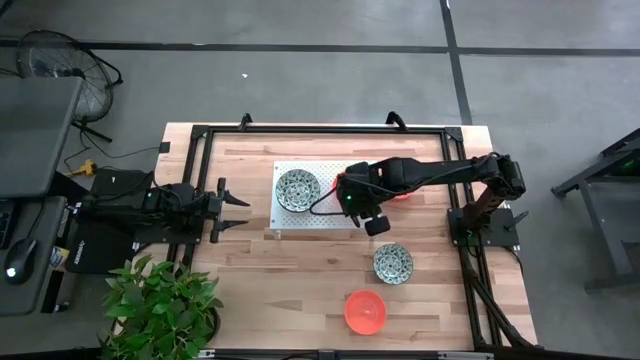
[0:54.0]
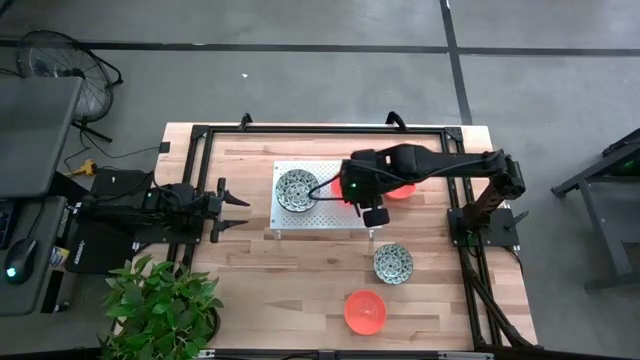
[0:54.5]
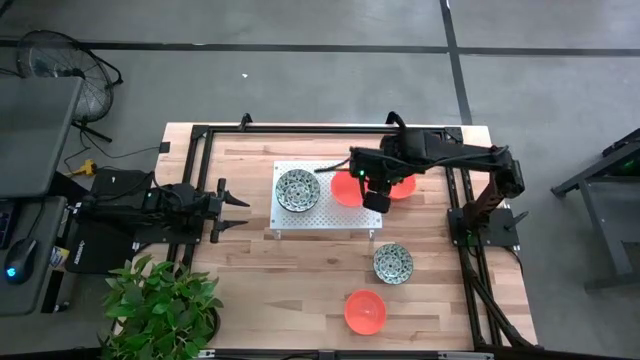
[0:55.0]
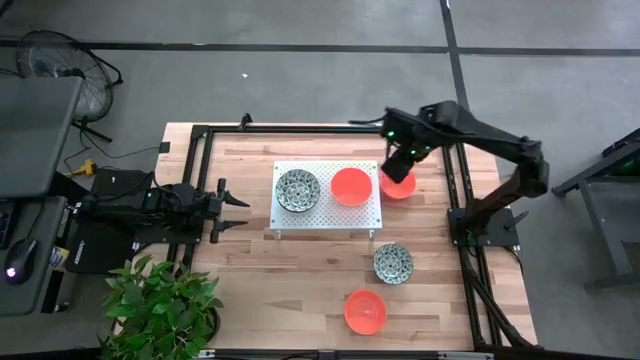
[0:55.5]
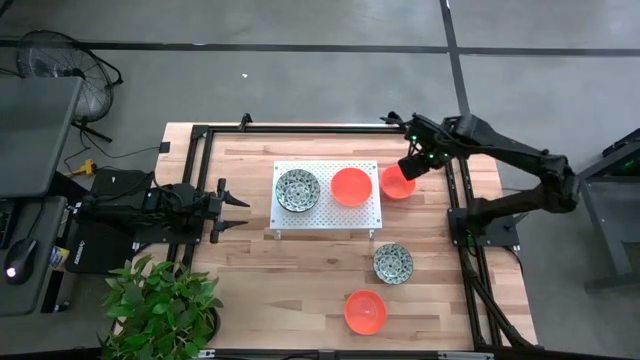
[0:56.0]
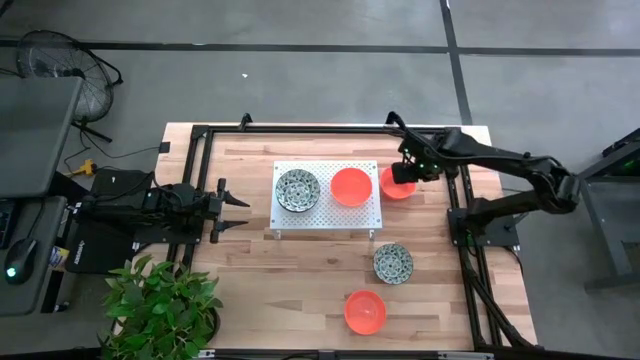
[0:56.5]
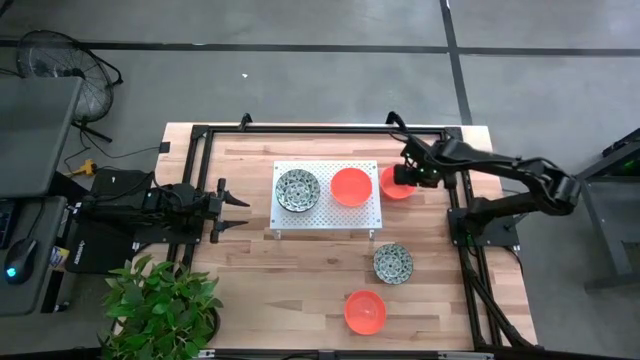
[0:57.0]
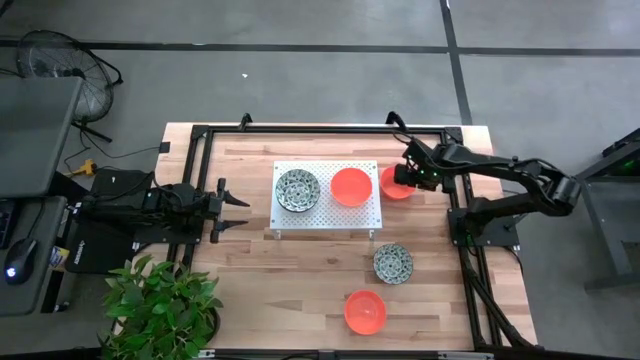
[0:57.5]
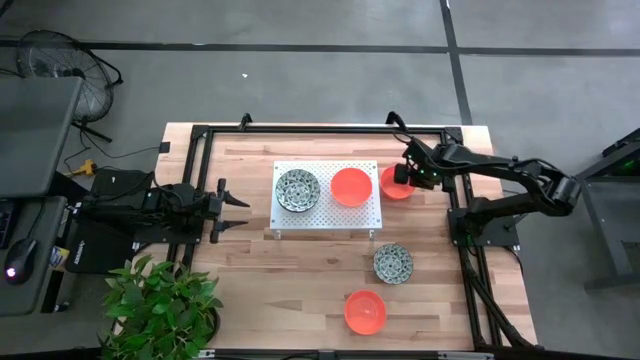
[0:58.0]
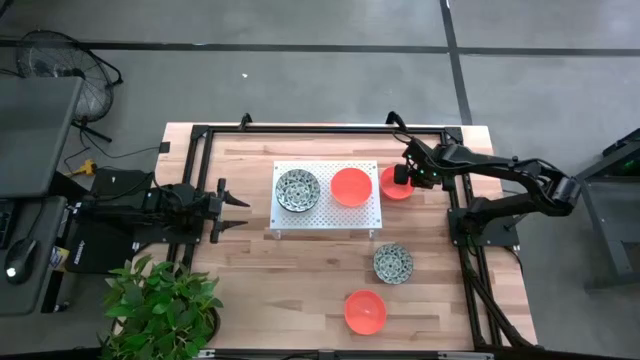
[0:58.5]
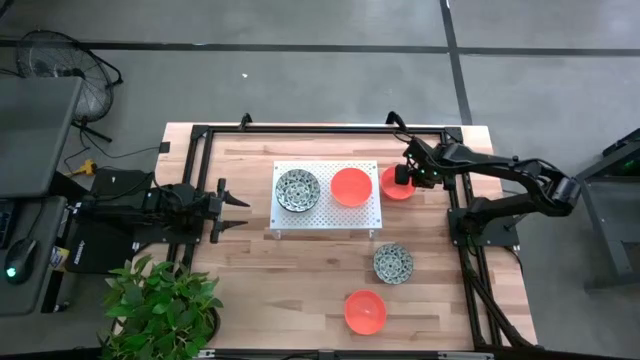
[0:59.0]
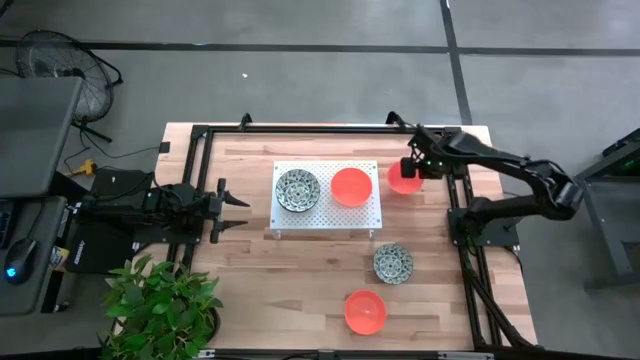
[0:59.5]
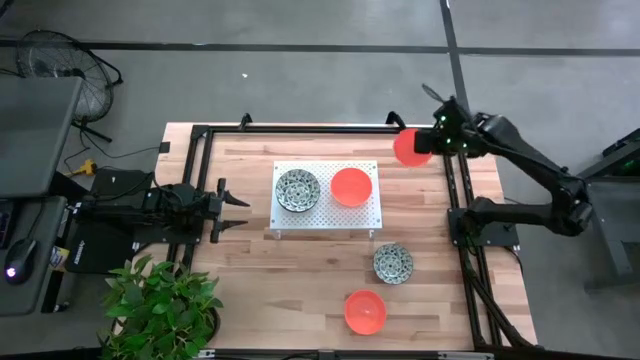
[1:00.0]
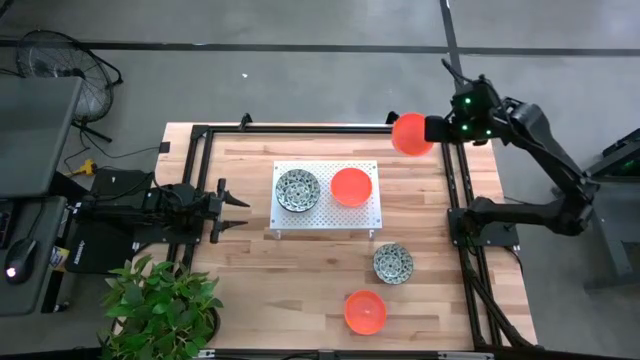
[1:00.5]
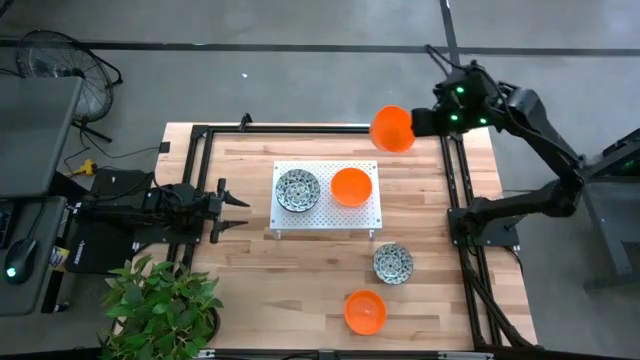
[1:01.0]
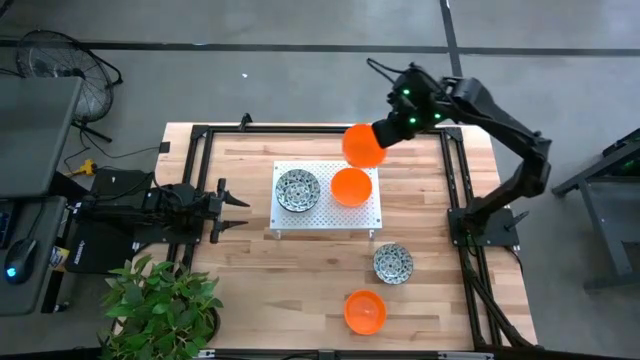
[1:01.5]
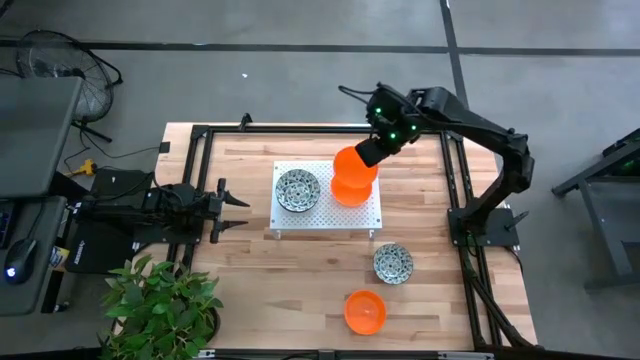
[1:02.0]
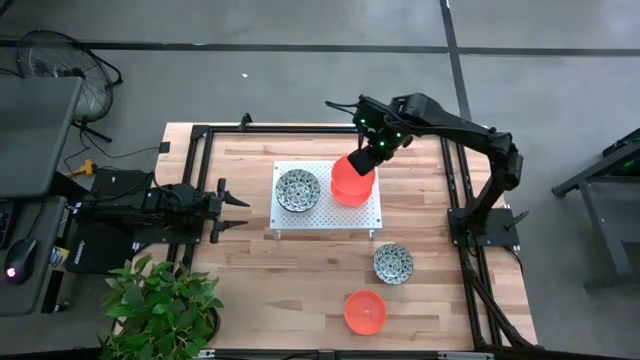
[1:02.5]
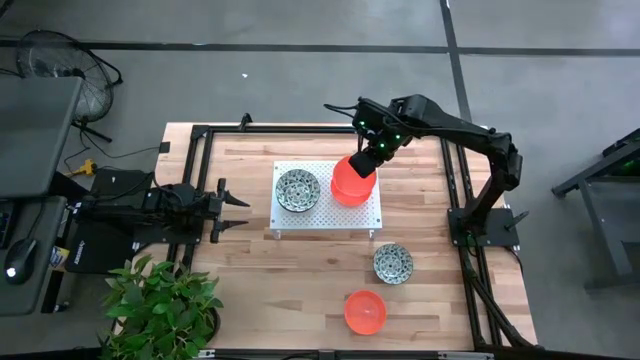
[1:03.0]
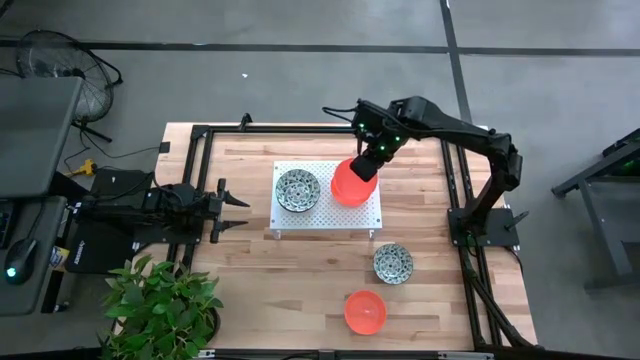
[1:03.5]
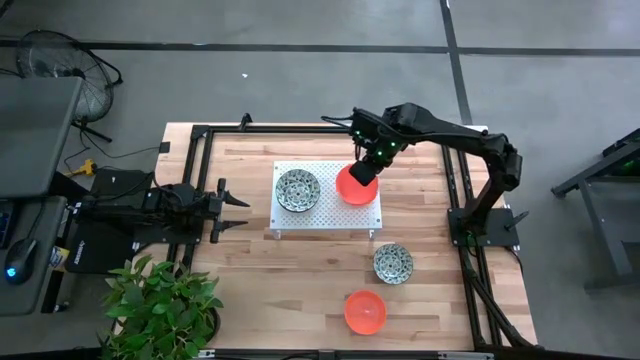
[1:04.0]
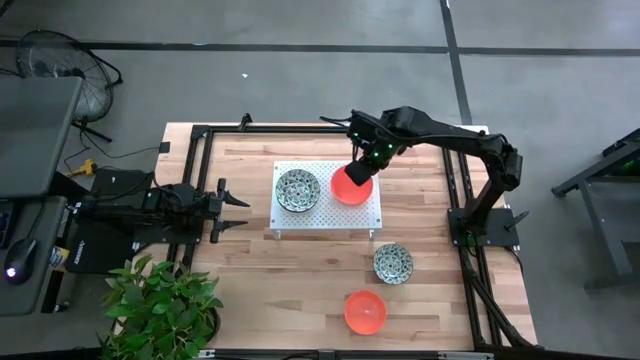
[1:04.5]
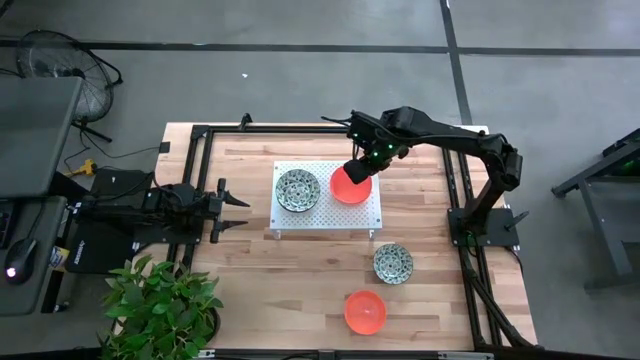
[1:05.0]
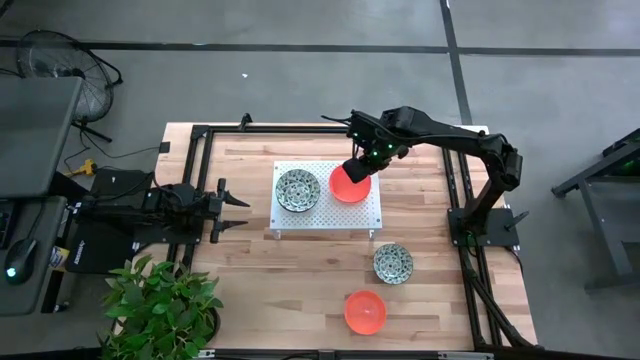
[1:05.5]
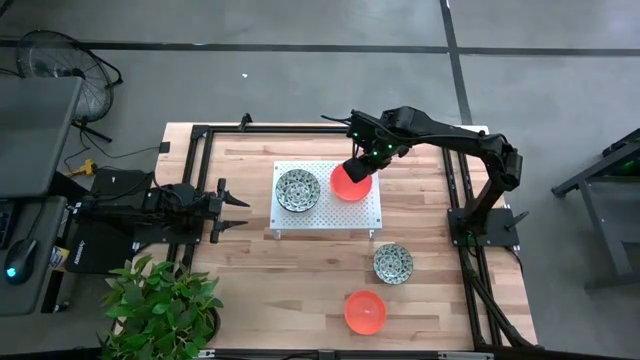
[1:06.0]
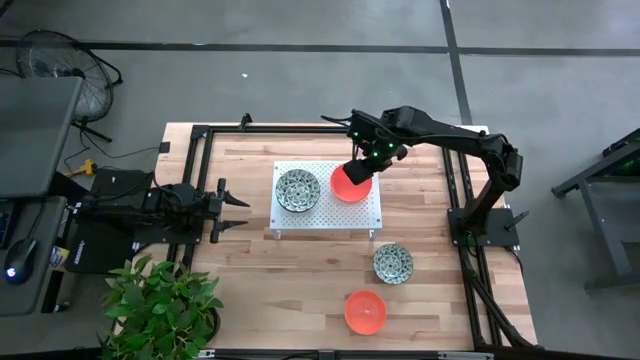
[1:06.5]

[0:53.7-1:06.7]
Task: Pick & Place Mini bowls
Stack the top orange bowl on the orange bowl on the shelf

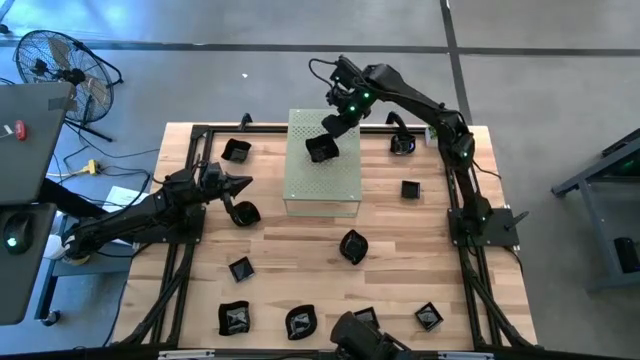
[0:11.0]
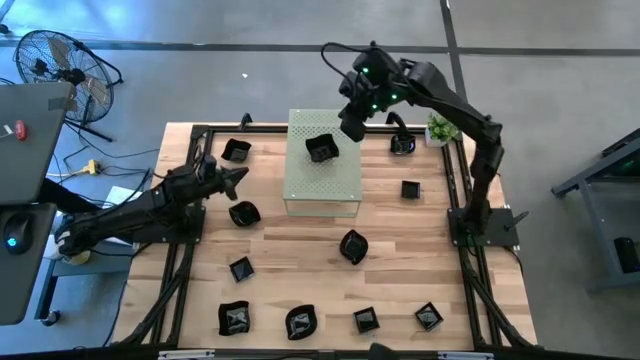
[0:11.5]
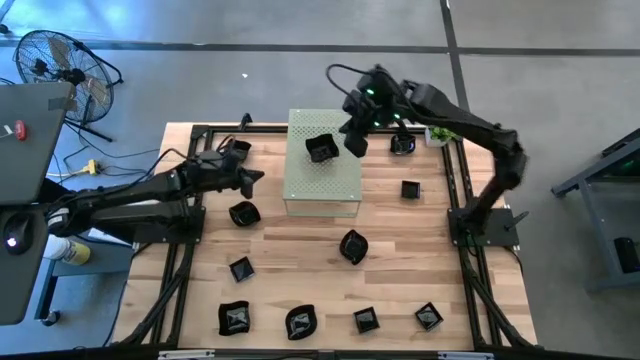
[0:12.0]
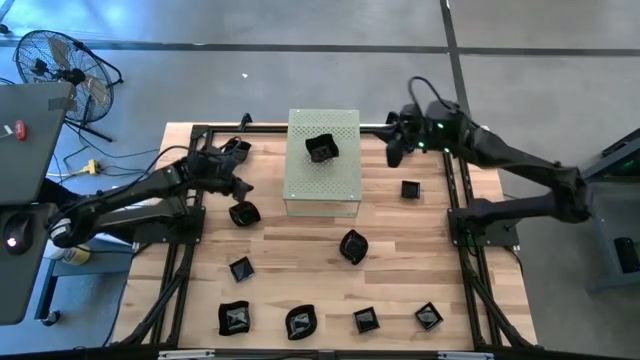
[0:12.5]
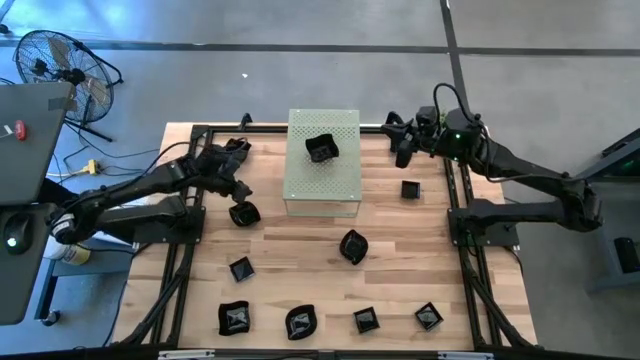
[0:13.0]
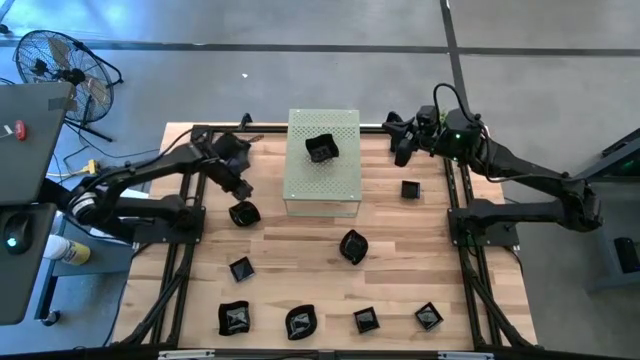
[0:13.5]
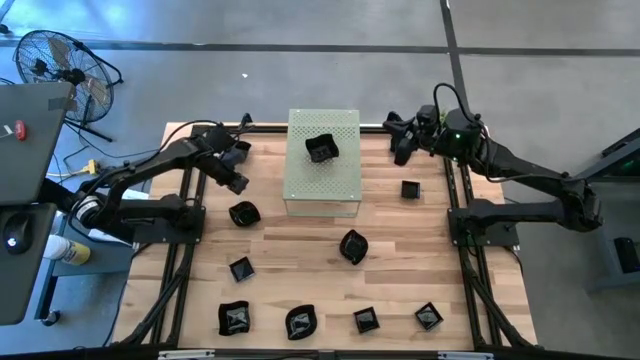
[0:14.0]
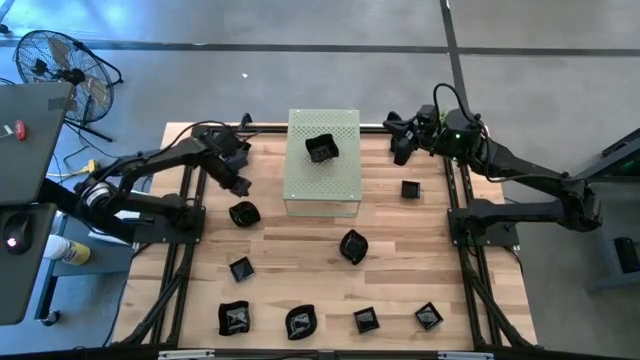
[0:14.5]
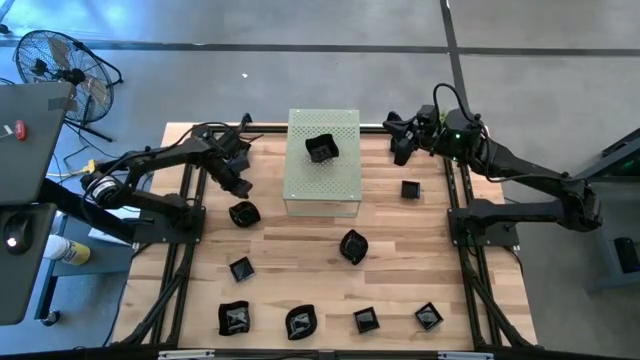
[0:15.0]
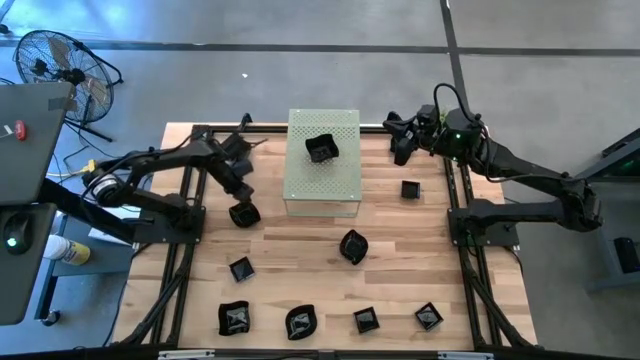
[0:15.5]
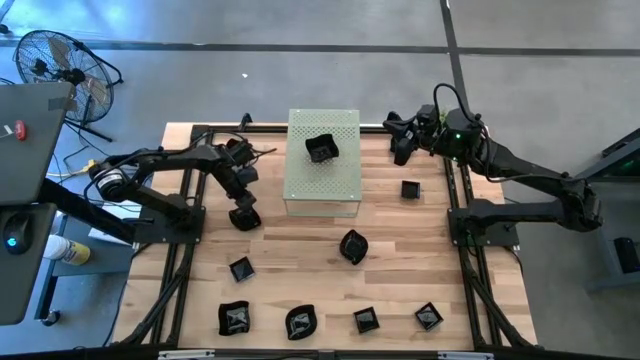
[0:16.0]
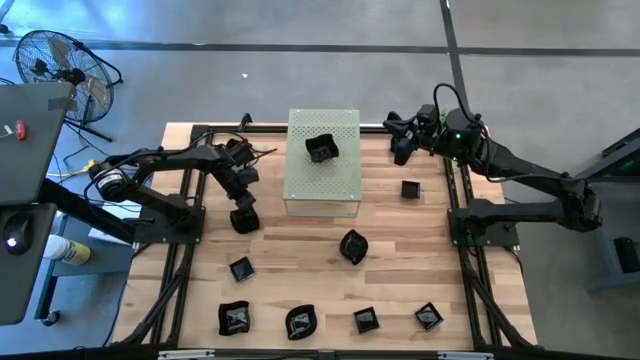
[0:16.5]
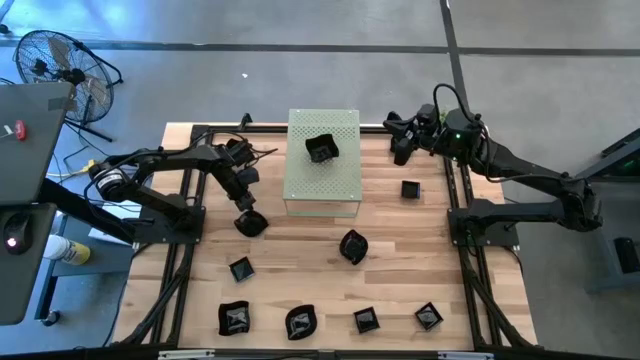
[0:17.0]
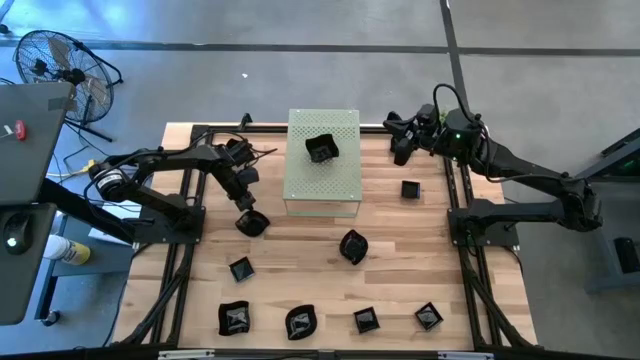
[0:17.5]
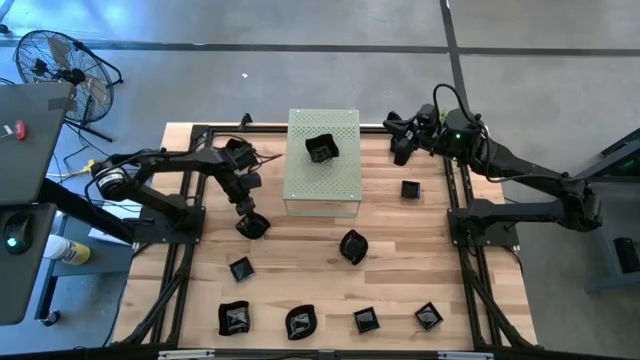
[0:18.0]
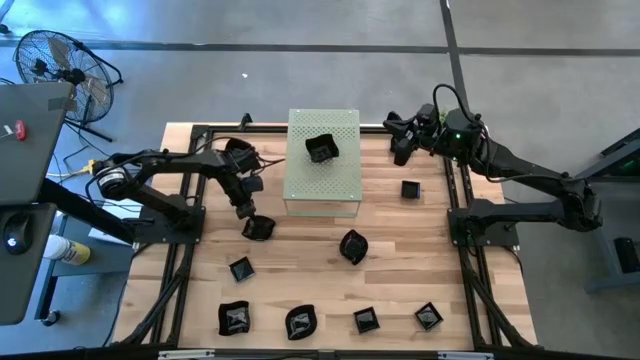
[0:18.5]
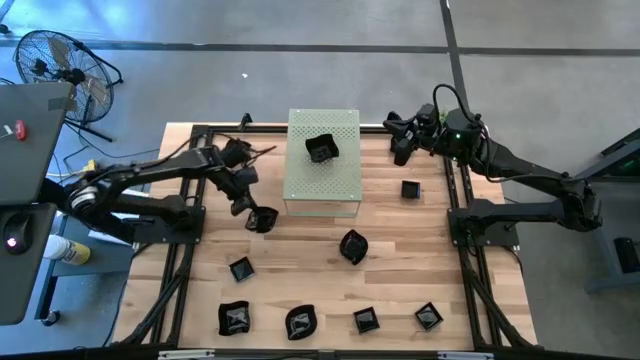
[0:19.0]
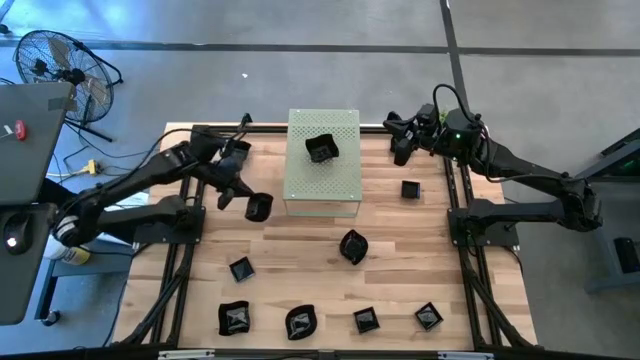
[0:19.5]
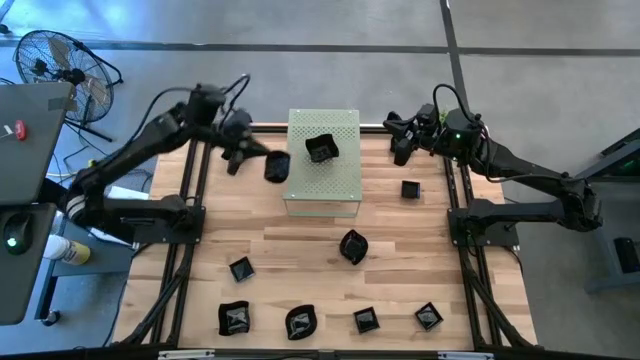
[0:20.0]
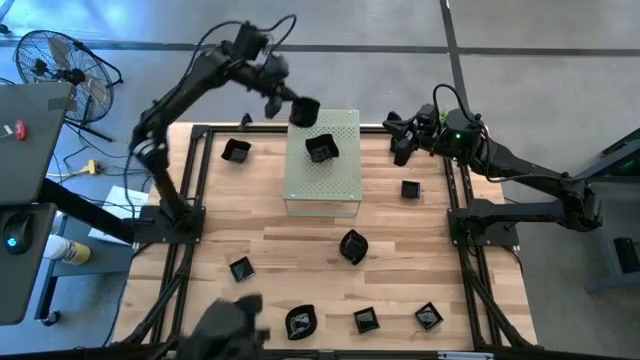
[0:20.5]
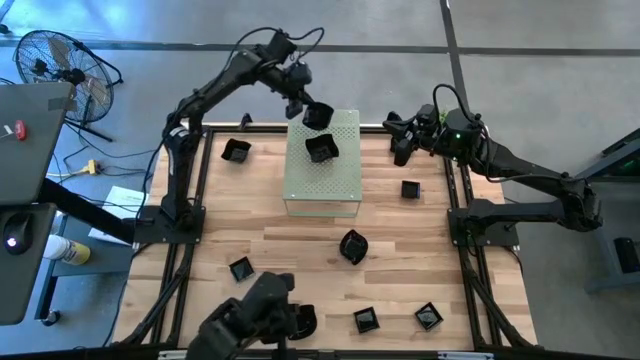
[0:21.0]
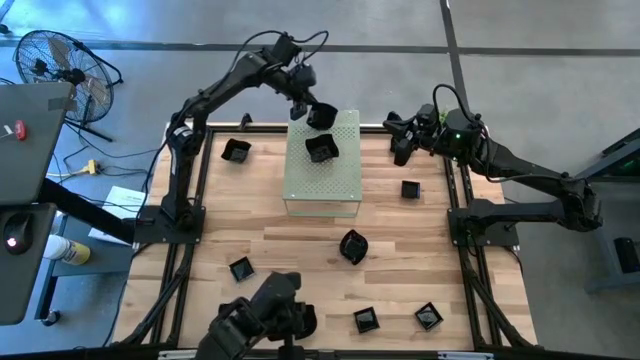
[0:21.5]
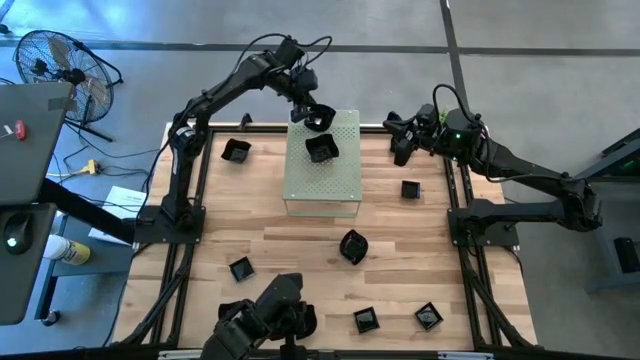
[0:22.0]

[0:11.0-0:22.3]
Task: Pick & Place Mini shaped plates
Put the left black leaf-shaped plate on the shelf
